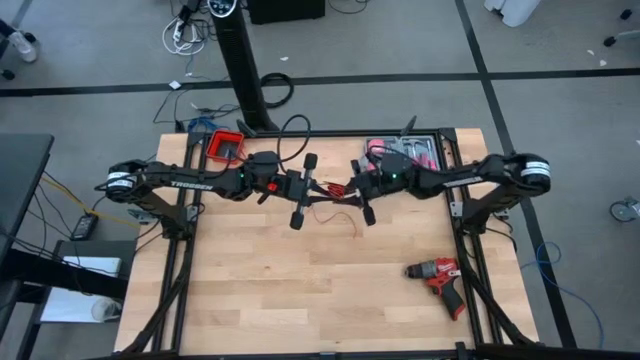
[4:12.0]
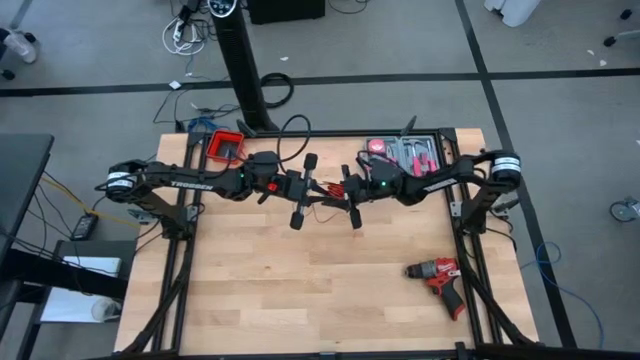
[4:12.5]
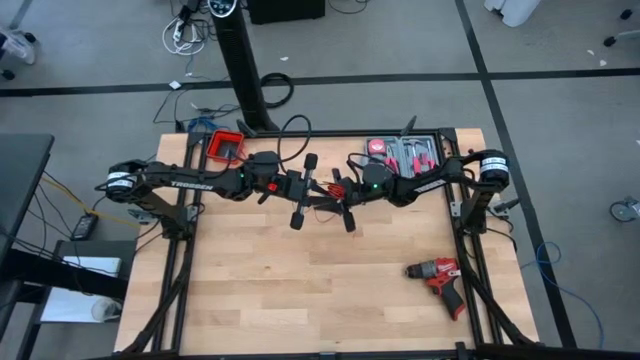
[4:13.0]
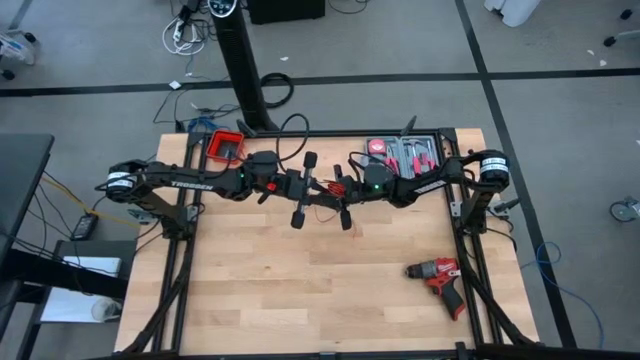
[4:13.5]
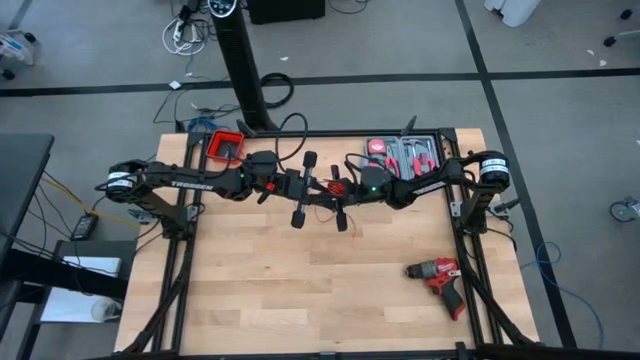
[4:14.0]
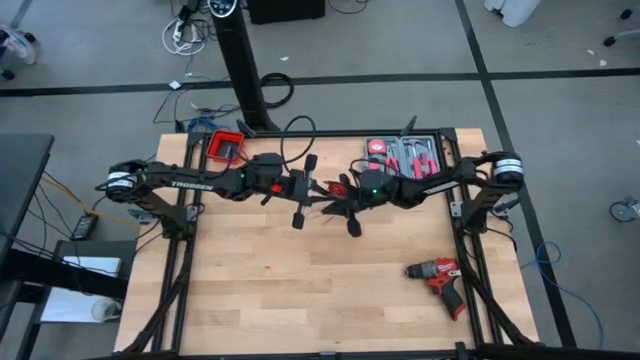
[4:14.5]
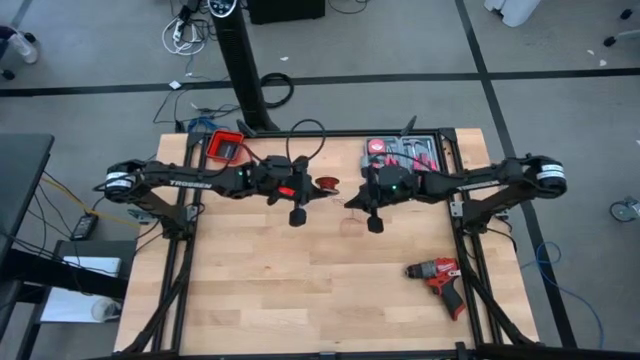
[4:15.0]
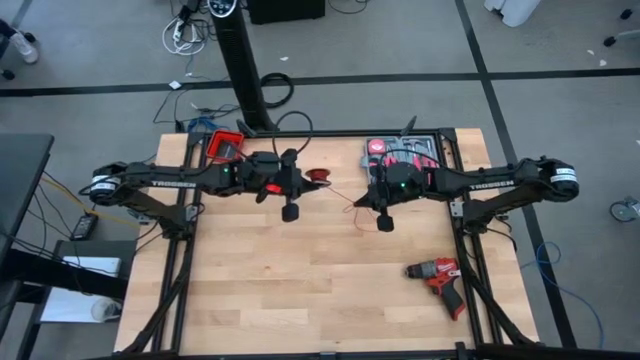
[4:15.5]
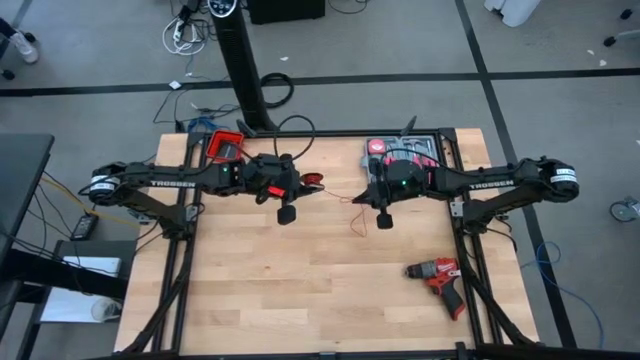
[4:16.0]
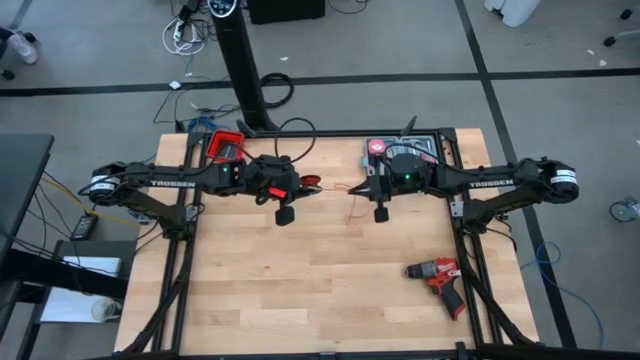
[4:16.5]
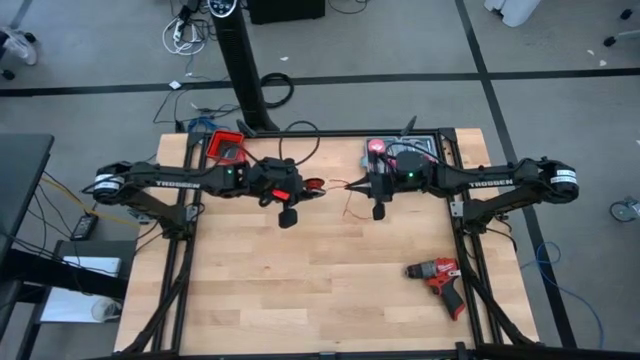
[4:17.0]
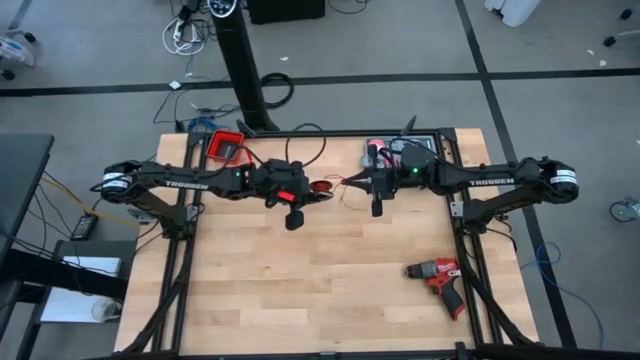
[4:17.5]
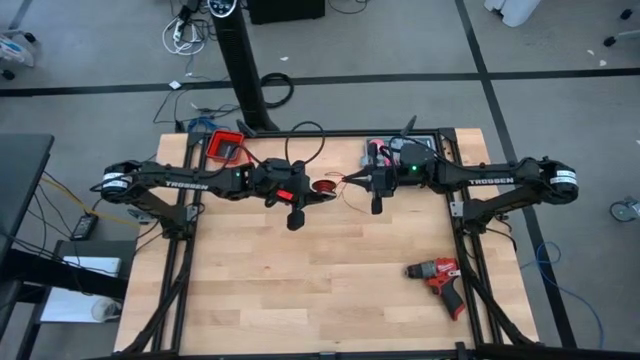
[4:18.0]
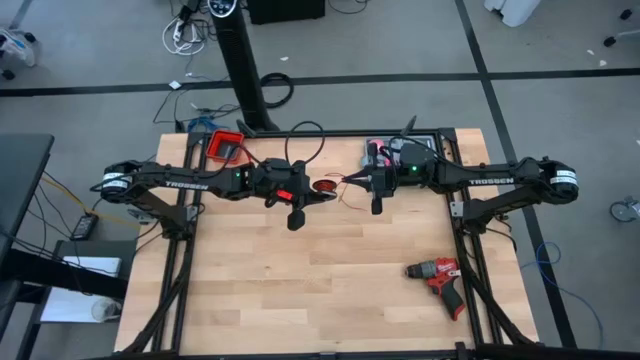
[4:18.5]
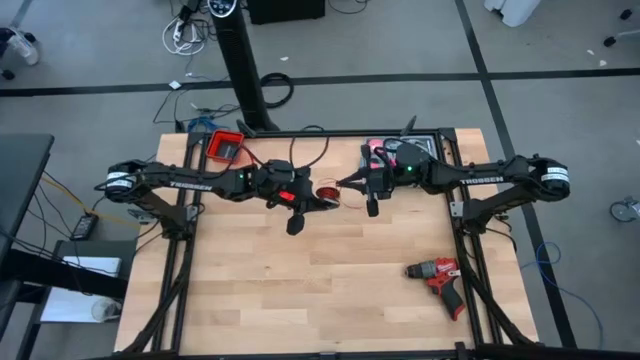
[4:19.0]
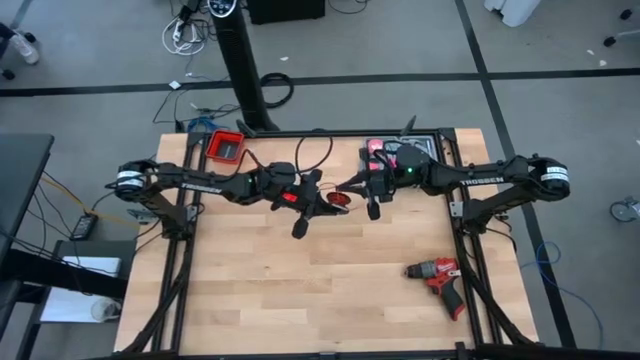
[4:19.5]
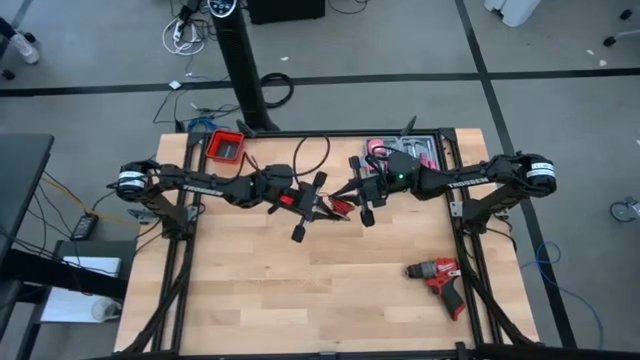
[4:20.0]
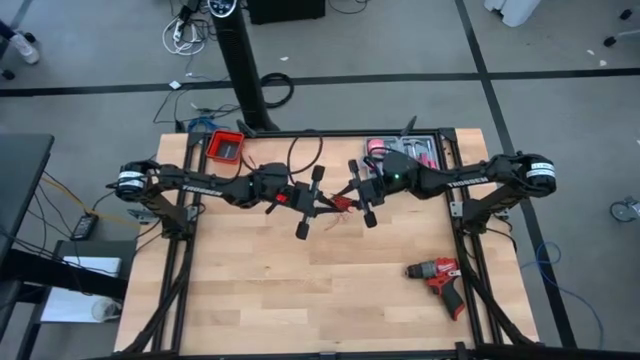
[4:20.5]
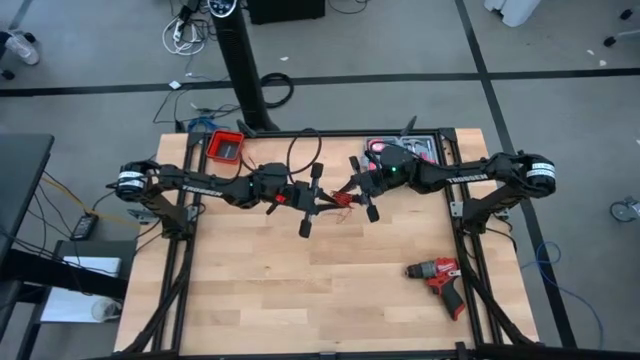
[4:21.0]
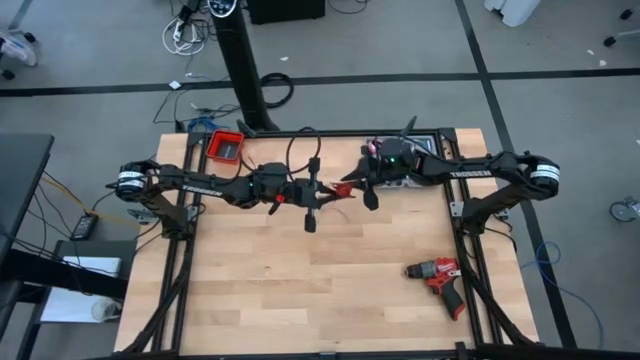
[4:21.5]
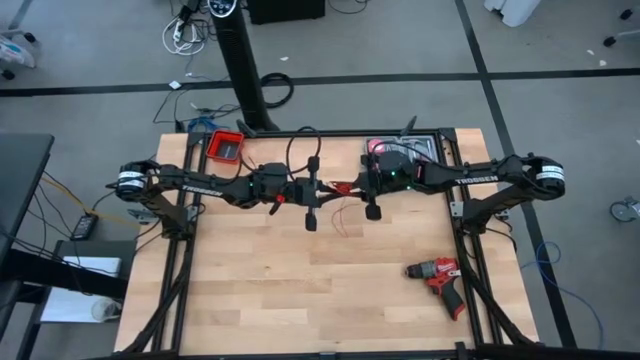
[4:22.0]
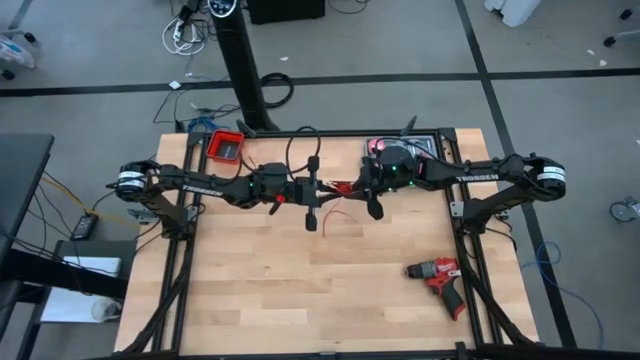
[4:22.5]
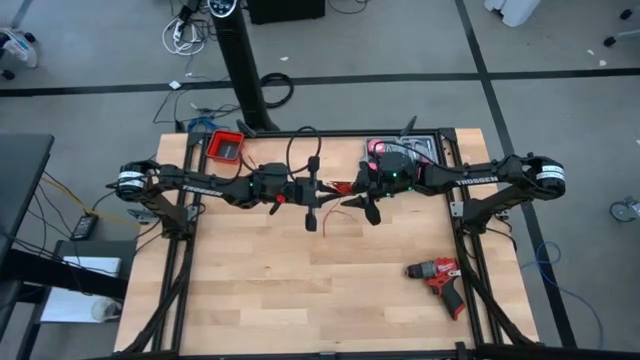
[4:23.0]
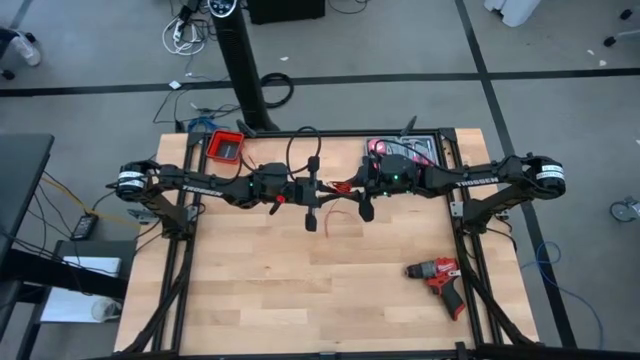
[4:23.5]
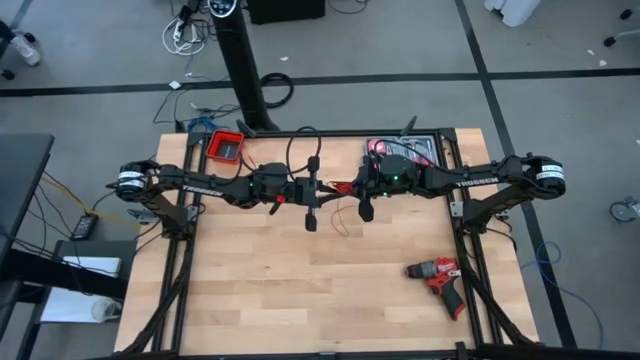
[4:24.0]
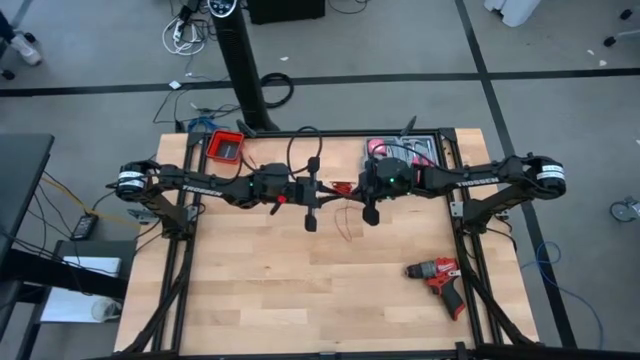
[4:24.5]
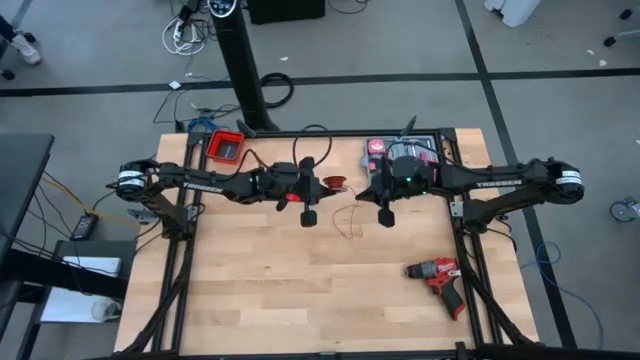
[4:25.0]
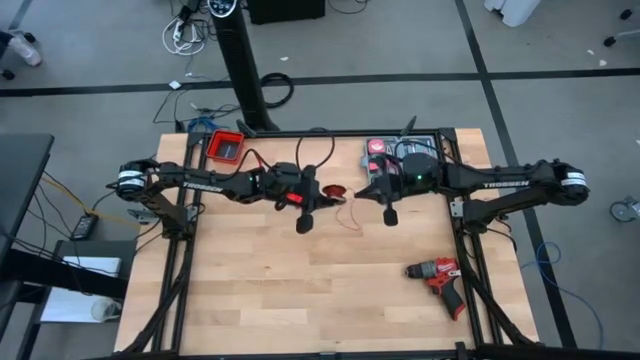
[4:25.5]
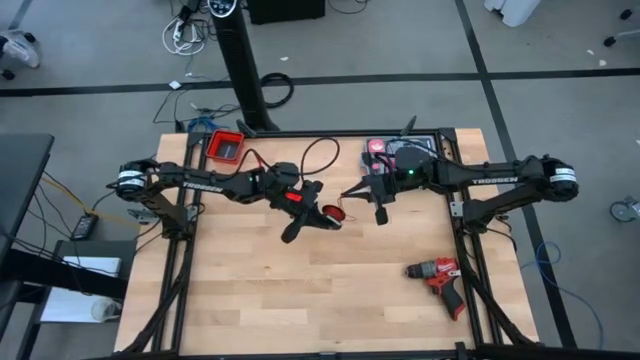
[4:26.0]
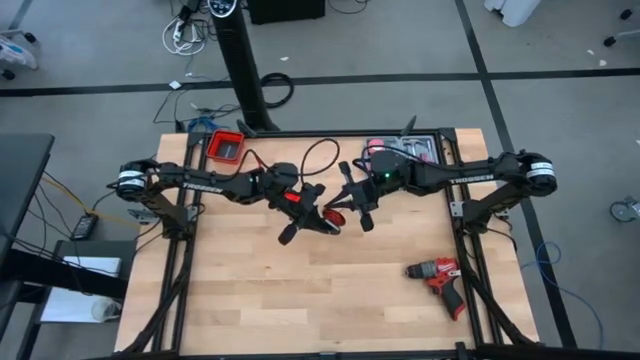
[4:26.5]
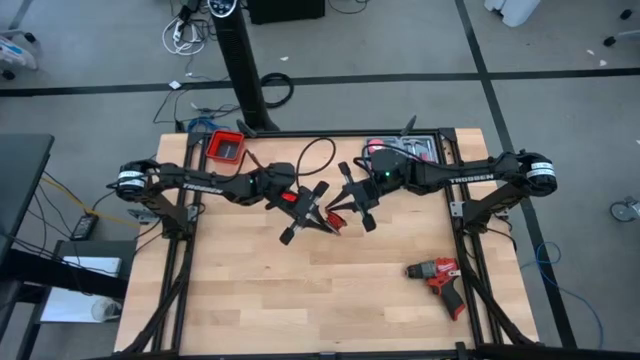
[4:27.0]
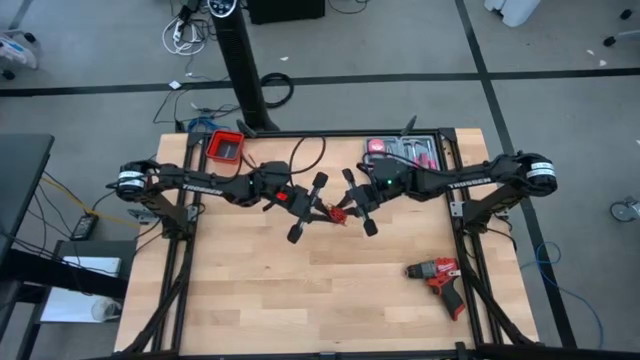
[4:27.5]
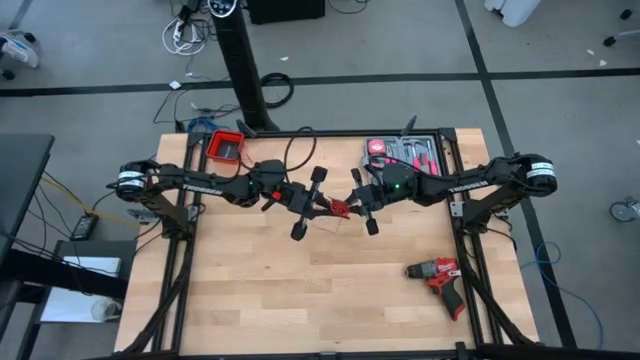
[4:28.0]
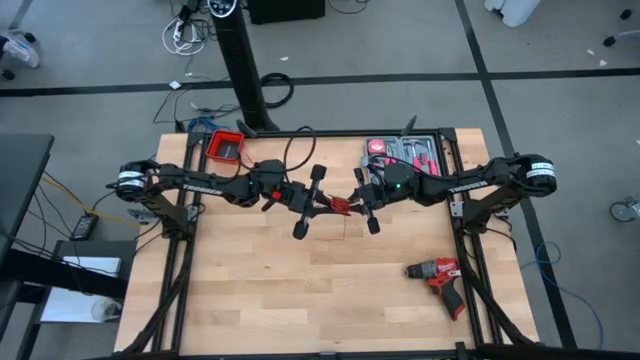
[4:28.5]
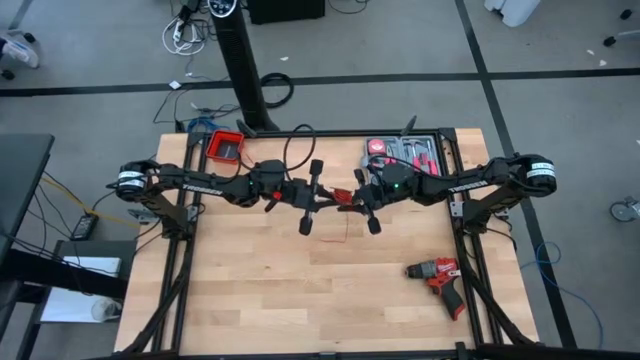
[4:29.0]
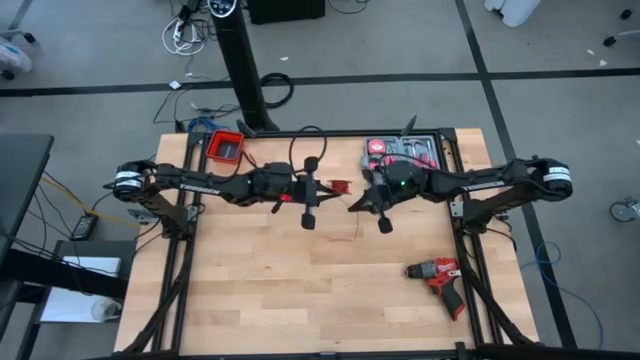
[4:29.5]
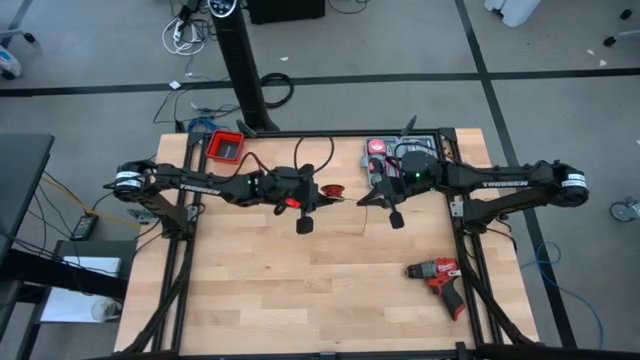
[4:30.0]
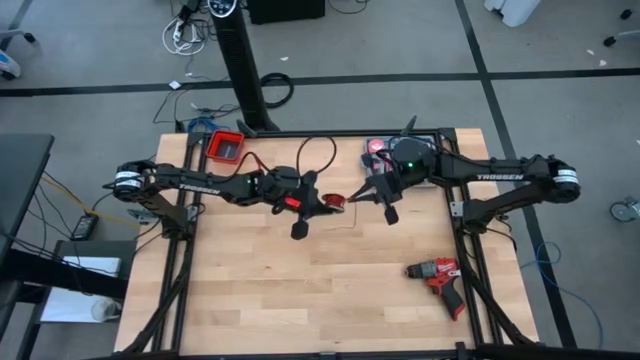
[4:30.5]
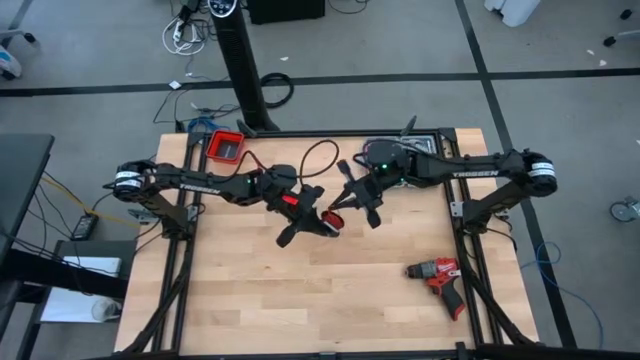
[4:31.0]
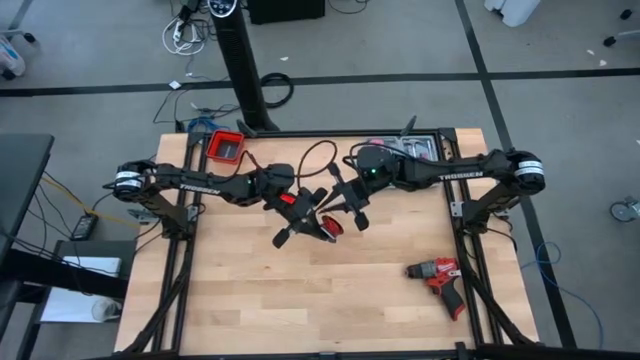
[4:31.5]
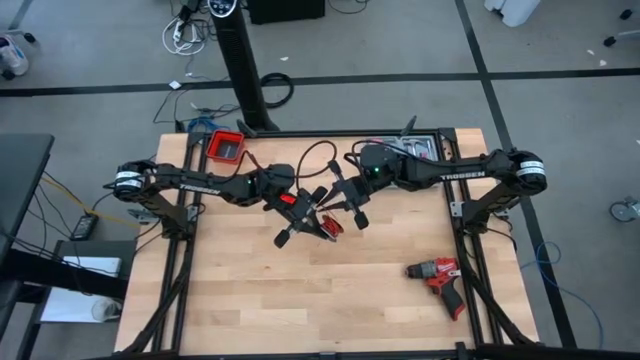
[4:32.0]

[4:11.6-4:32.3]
Task: Coil cords
Coil the red wire onto the black spool
